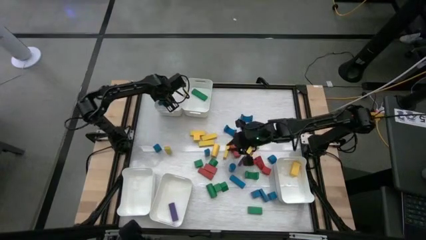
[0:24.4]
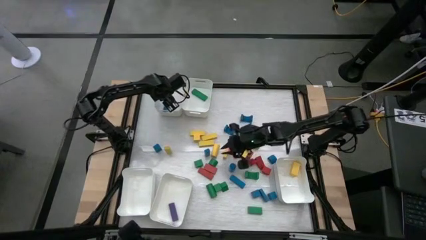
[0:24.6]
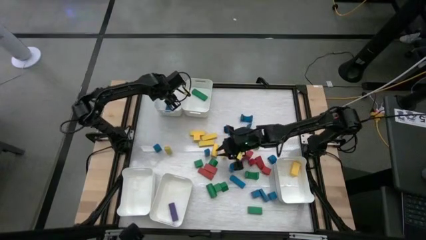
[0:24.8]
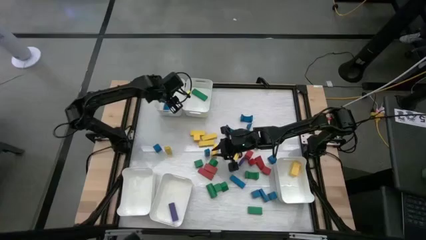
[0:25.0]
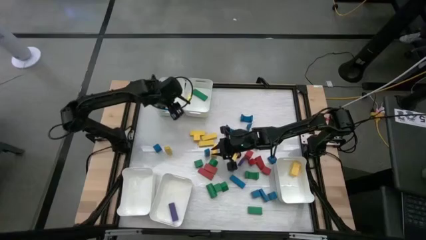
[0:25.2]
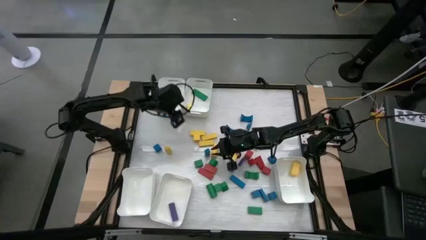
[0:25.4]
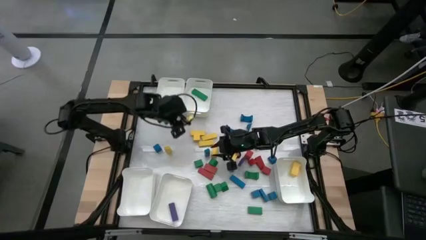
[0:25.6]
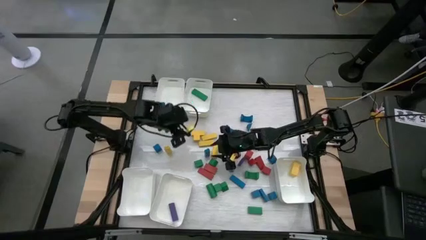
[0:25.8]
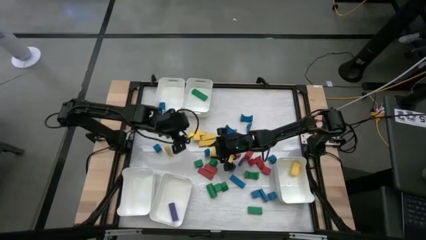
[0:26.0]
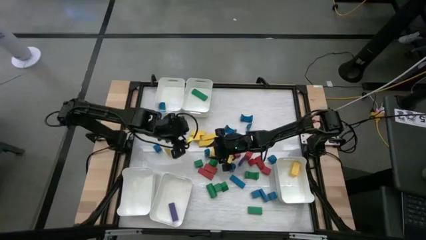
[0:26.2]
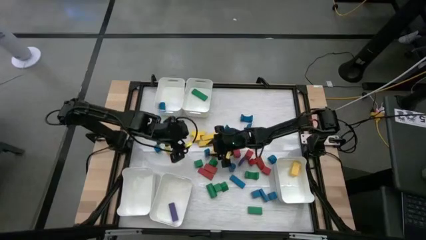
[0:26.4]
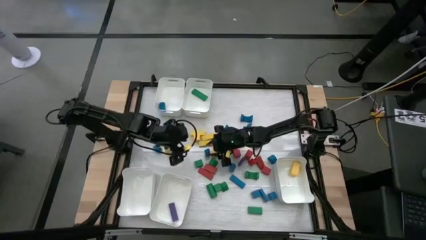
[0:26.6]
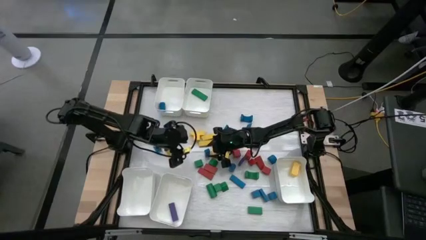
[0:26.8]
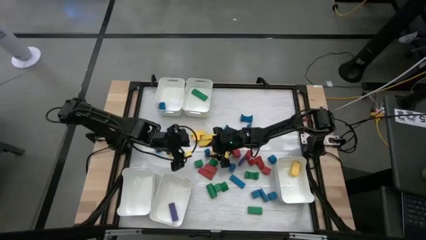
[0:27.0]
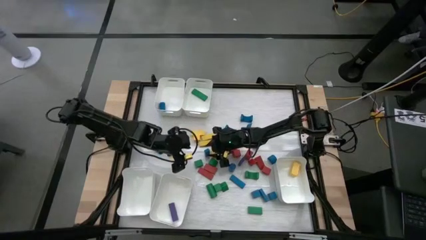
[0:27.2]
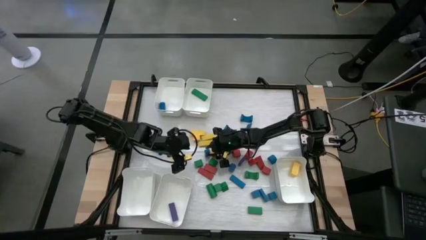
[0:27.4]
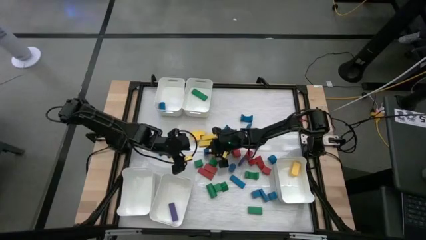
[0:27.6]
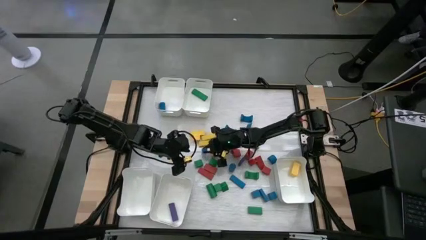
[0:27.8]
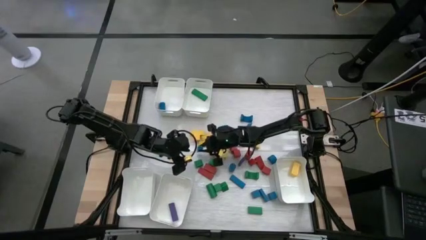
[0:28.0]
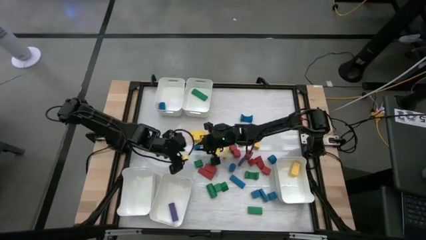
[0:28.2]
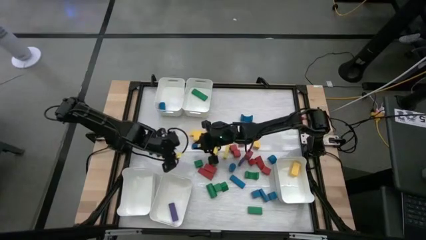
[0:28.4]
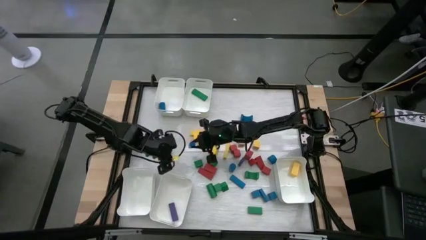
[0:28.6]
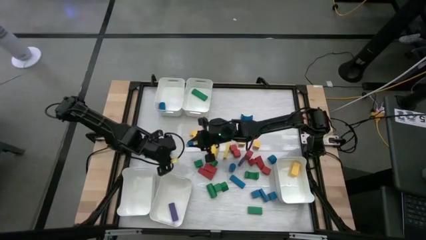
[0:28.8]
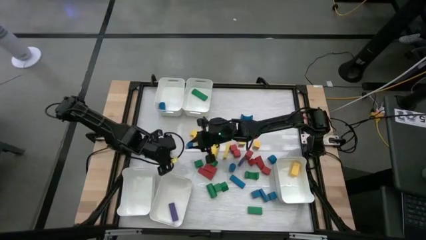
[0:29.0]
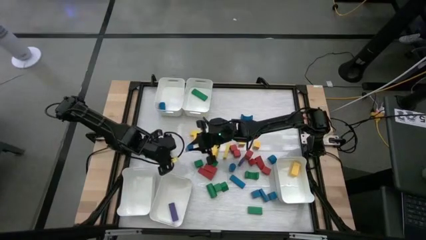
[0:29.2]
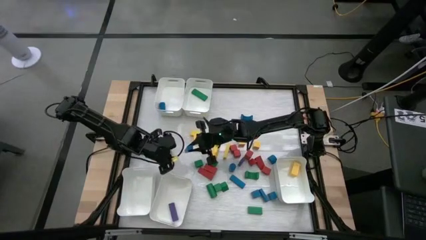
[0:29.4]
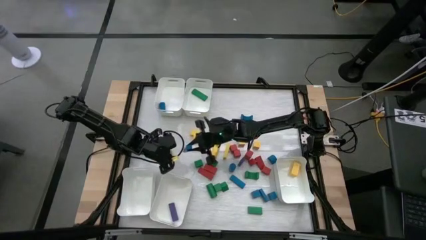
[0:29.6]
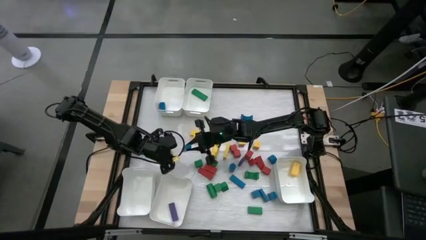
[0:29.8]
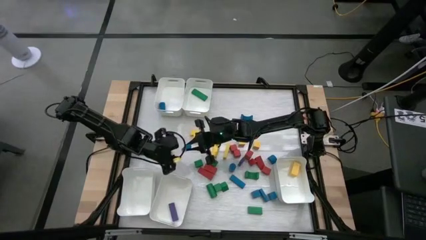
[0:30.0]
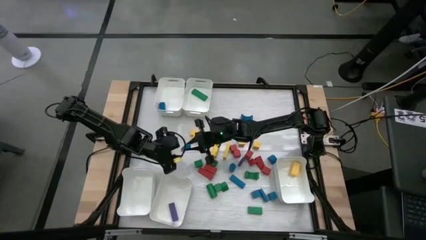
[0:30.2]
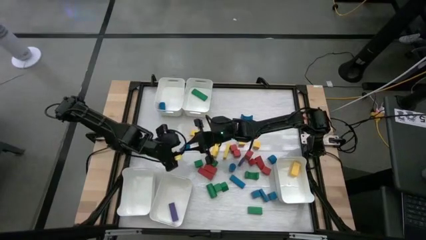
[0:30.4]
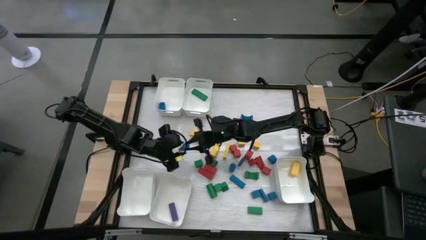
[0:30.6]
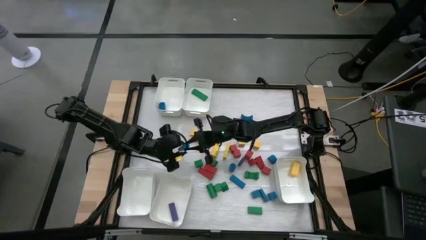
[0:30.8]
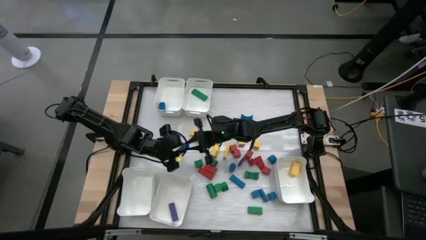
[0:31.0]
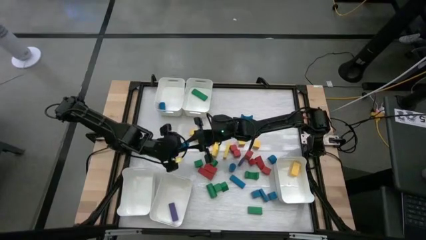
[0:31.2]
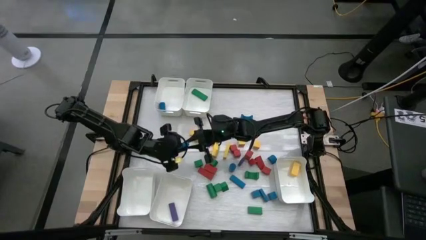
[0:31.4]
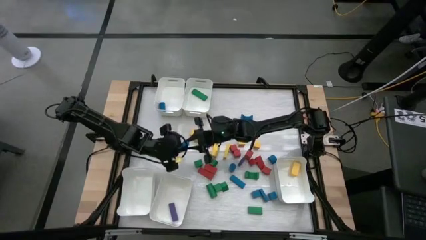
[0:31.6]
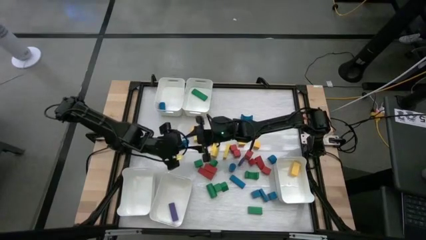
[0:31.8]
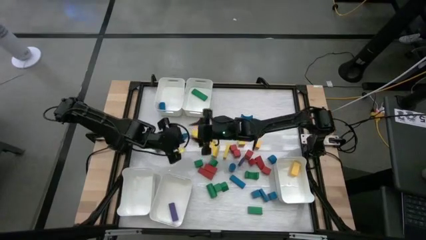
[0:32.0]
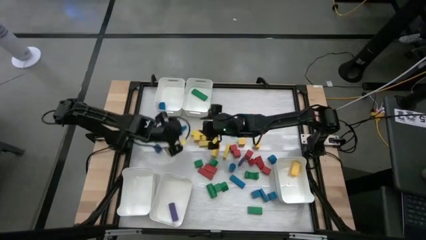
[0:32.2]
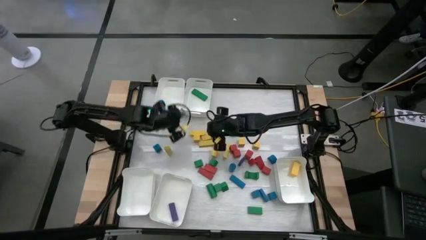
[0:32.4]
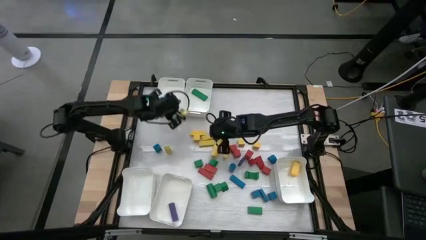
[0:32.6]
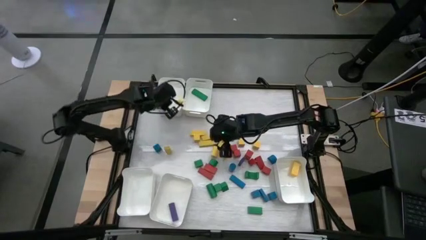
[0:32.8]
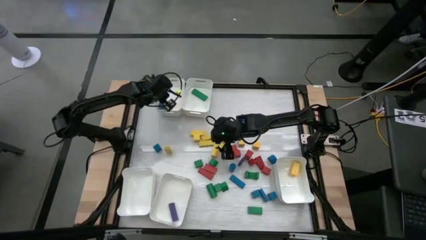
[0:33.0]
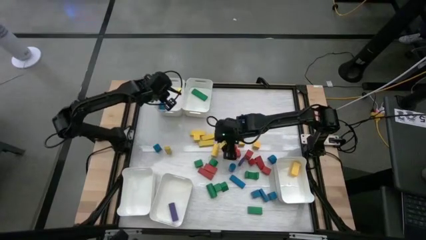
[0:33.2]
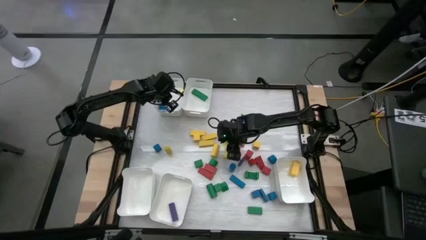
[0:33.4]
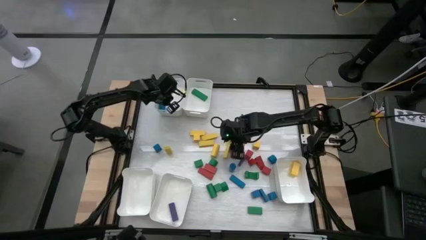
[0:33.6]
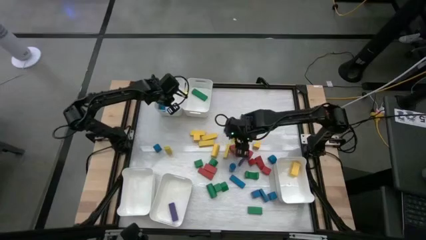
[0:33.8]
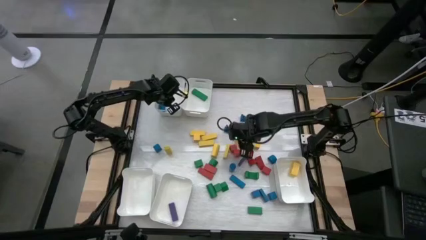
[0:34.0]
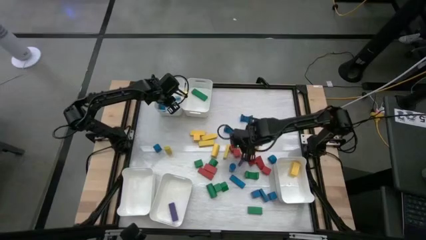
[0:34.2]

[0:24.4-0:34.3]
Task: Sort blocks
Put the blue block into the top left white bin

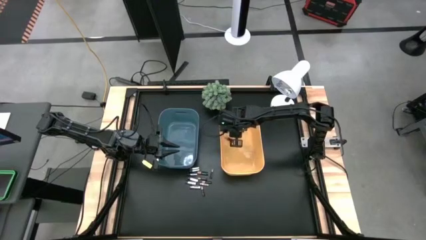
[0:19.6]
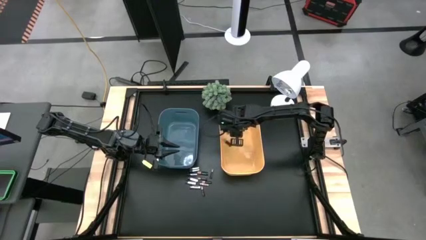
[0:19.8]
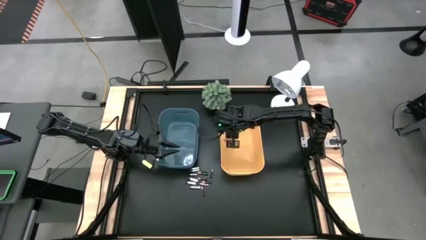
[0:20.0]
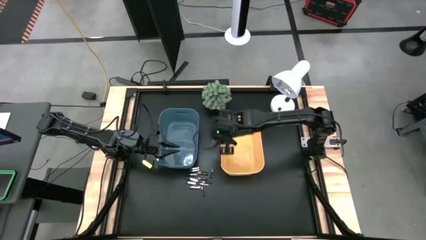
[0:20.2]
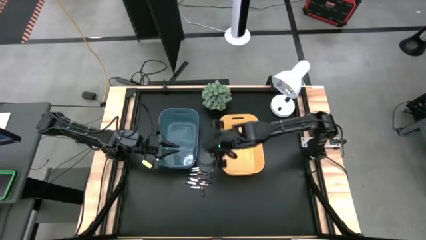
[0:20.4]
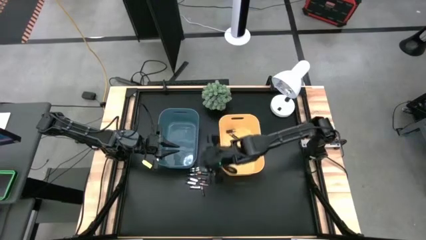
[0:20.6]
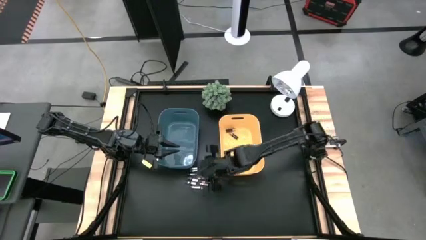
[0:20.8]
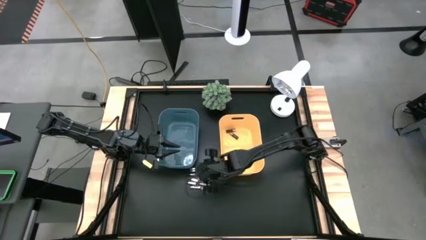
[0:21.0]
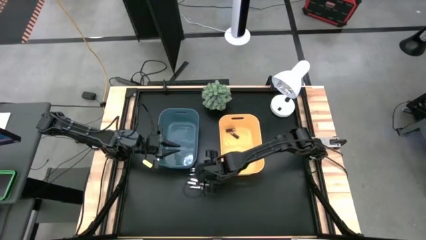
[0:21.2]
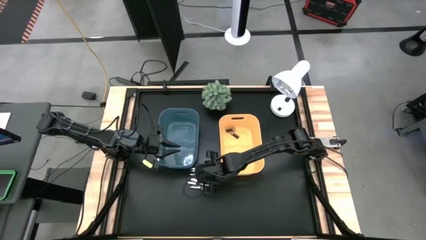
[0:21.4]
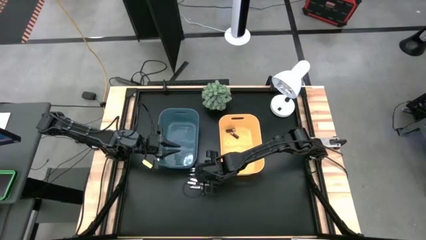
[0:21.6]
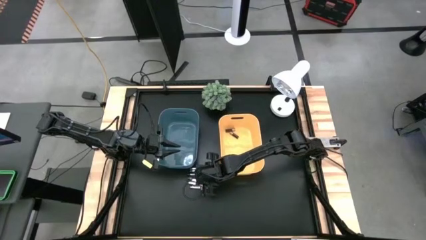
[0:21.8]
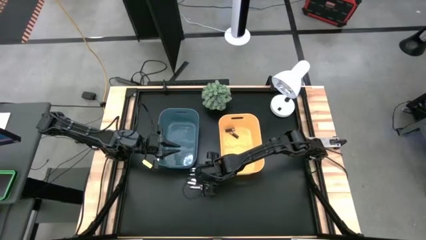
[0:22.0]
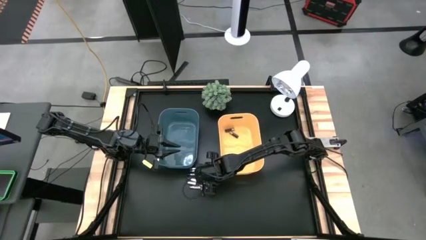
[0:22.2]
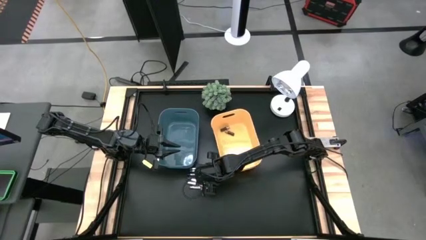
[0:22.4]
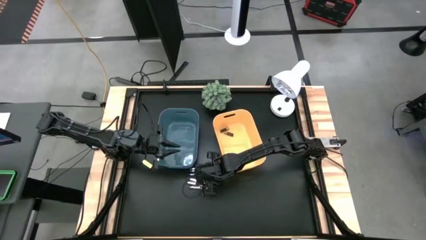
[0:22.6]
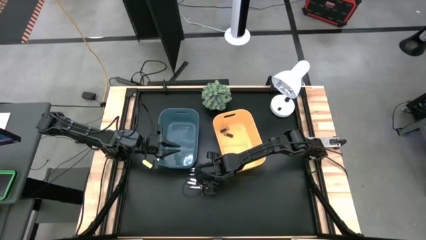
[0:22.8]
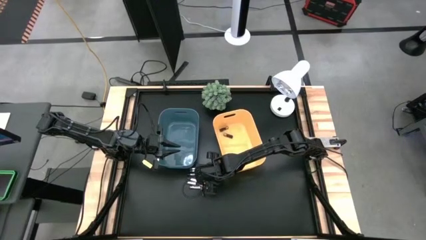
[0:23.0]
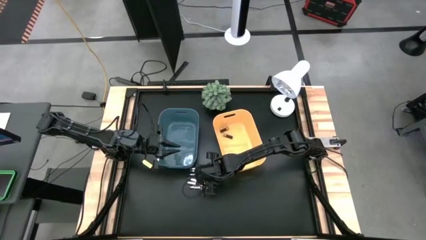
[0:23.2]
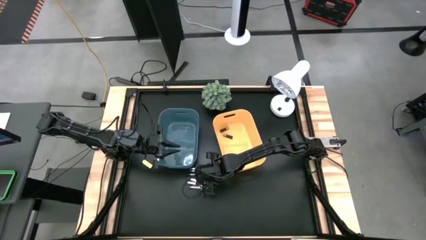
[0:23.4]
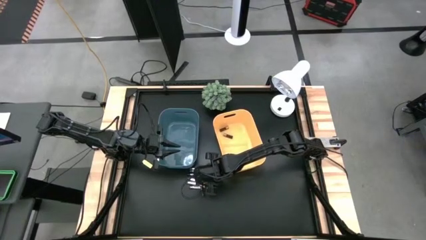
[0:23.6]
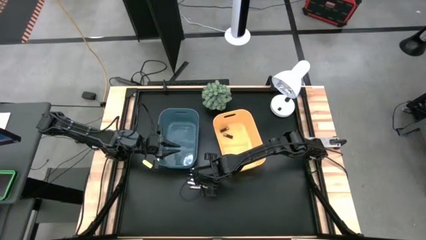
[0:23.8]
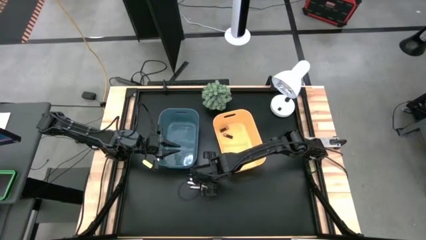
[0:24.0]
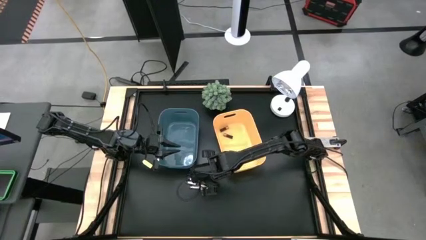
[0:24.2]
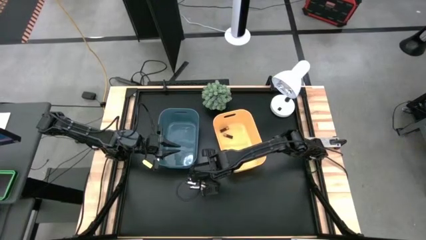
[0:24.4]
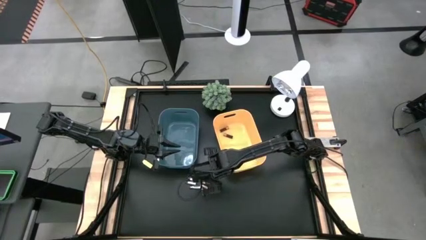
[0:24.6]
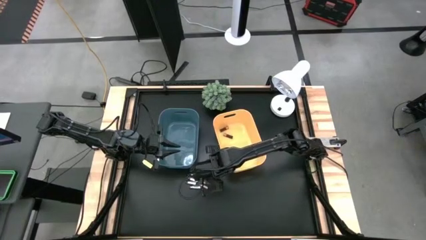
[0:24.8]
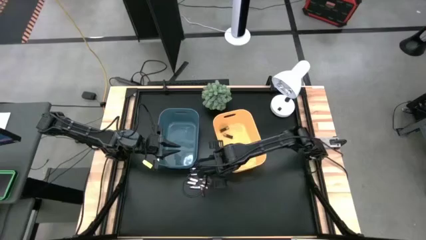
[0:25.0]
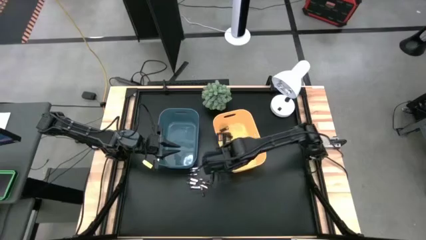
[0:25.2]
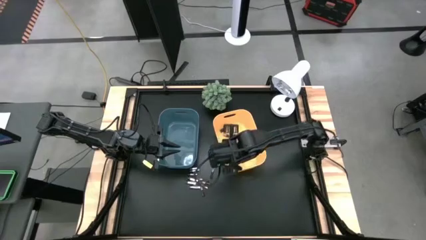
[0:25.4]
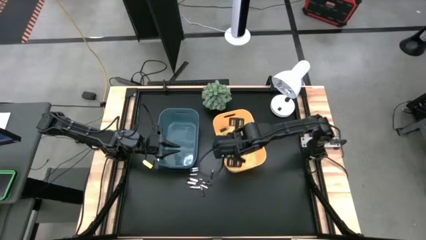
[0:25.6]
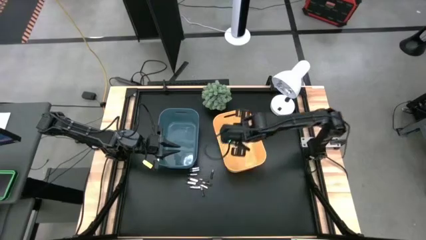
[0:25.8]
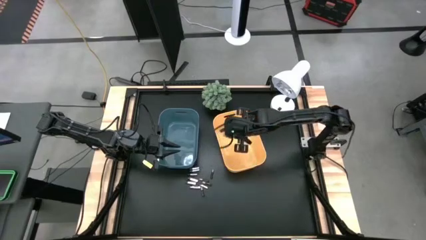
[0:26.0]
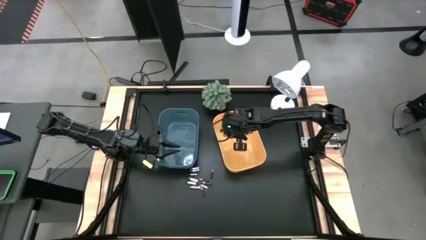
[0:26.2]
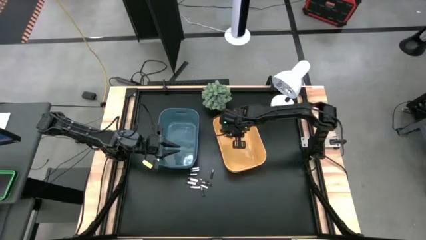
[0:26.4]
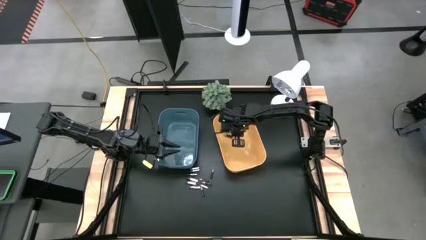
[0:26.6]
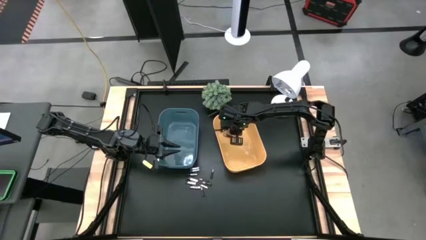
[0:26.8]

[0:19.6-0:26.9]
Task: Sort batteries
Put the black battery into the yellow bin
